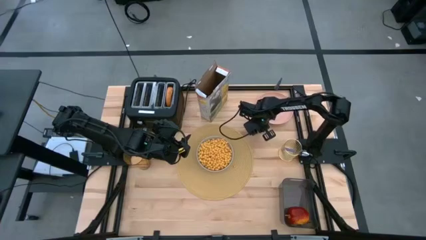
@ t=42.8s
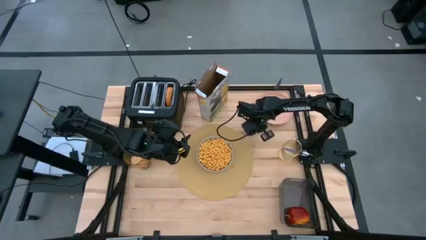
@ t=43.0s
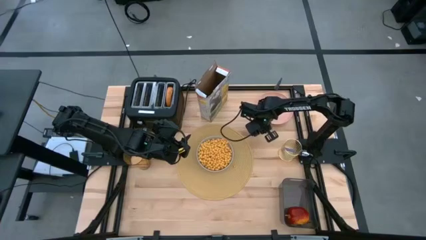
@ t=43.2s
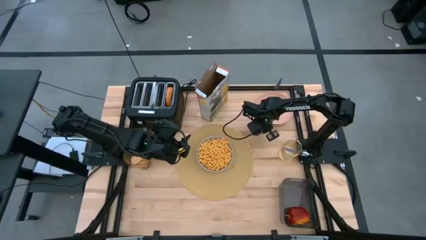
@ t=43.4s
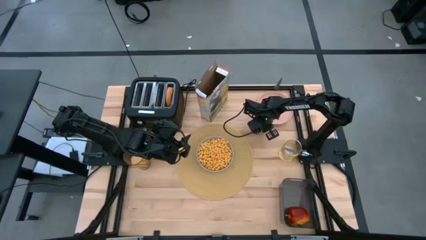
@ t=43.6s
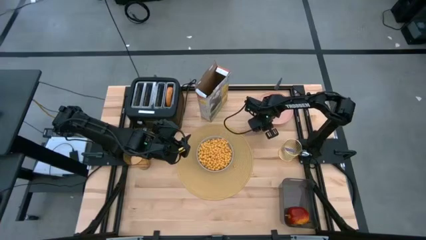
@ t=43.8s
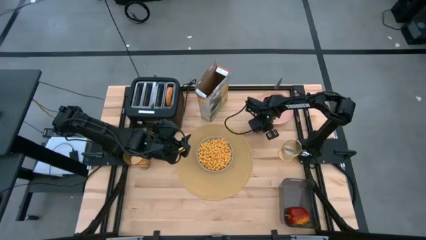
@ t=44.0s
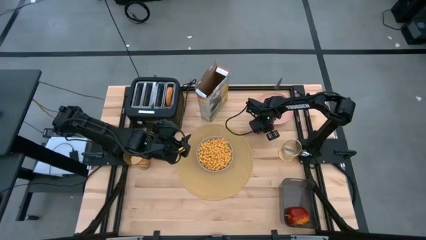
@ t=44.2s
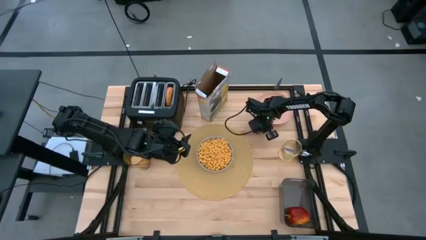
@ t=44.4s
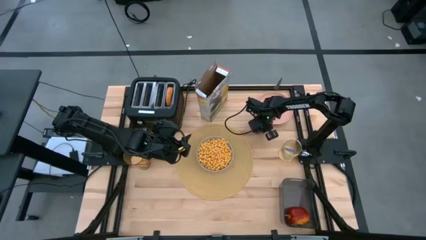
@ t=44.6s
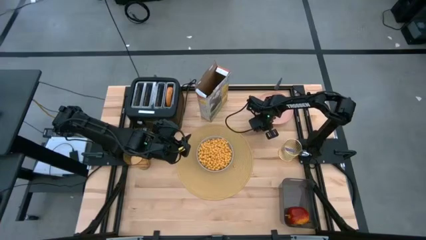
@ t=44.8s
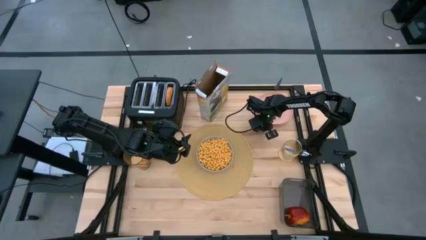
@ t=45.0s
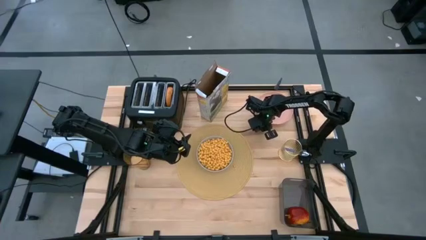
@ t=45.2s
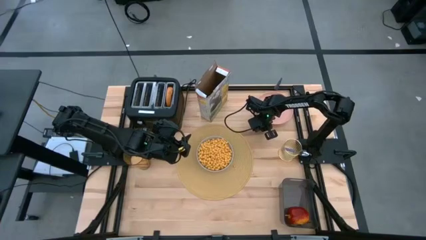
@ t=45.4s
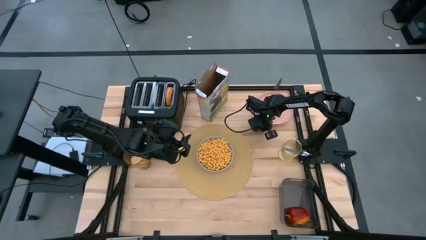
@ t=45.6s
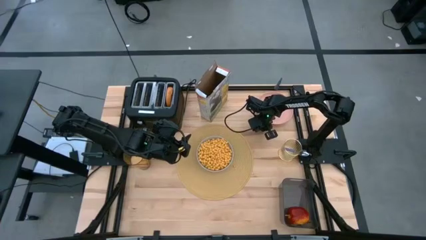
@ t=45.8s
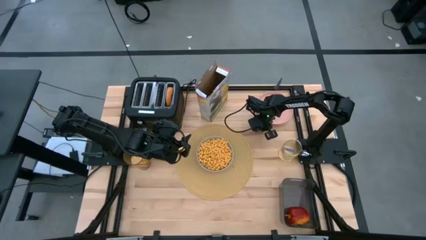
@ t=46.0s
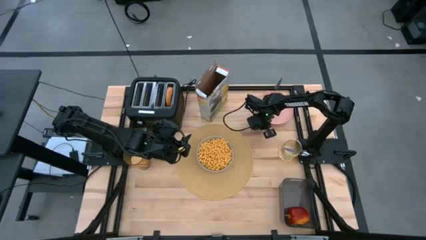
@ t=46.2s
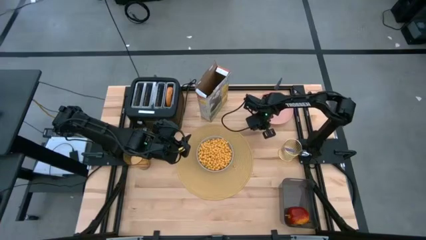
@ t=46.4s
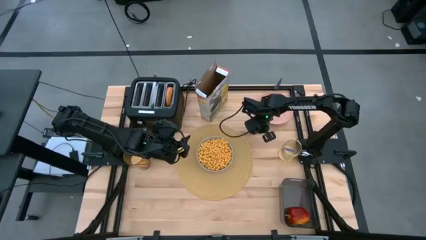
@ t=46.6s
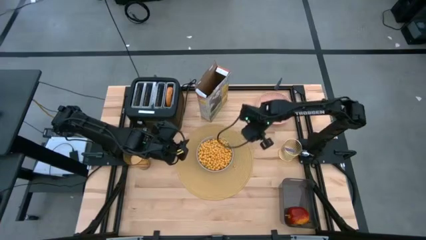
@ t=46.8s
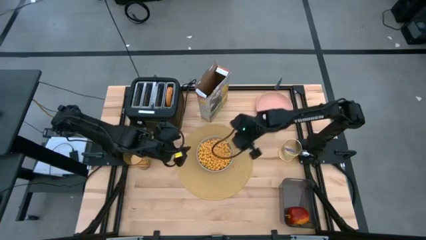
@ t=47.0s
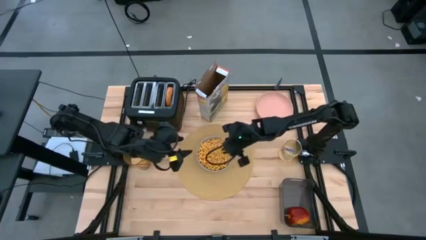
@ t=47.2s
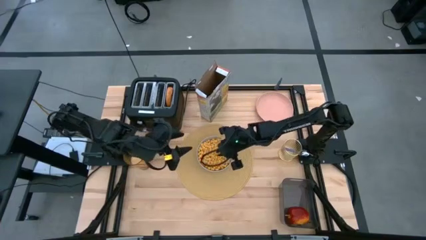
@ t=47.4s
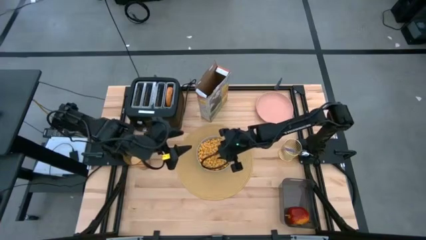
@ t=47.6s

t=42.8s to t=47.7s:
Task: Arrange a breakfast setting
Put the yellow cereal into the gray bowl

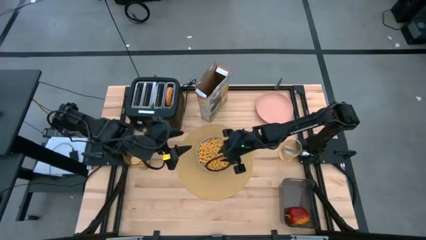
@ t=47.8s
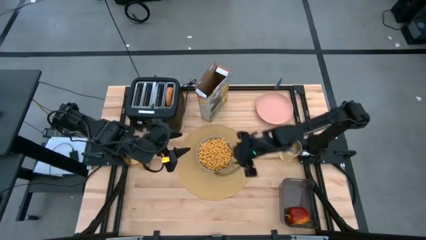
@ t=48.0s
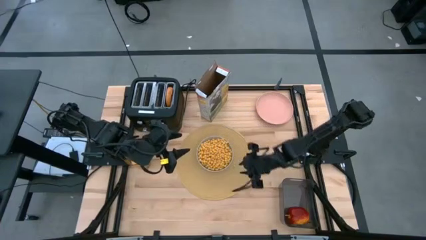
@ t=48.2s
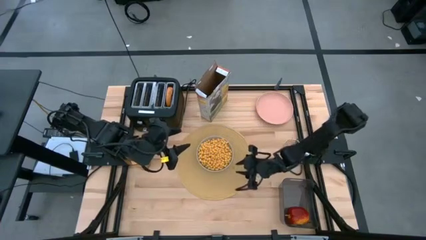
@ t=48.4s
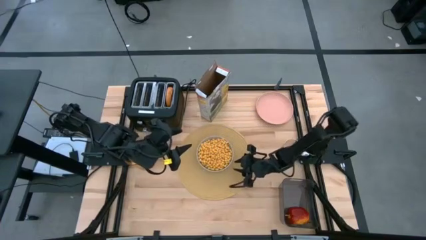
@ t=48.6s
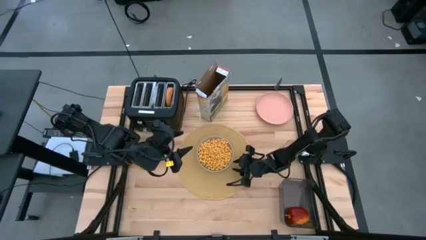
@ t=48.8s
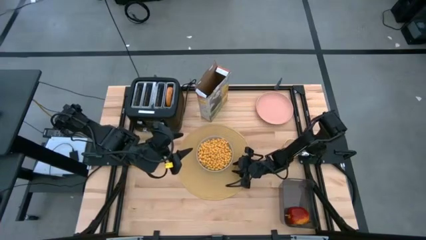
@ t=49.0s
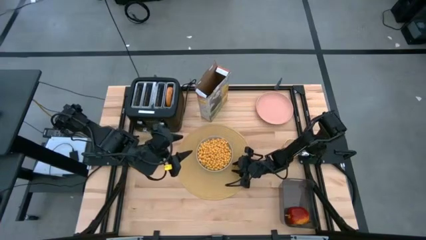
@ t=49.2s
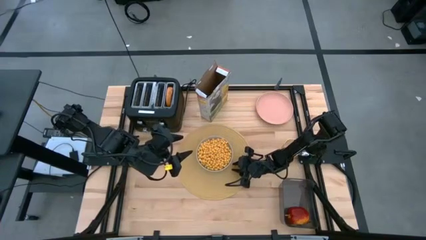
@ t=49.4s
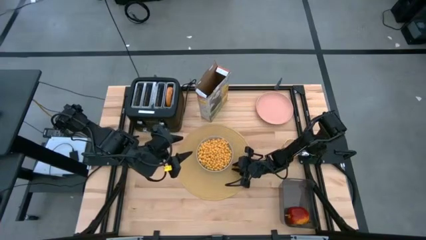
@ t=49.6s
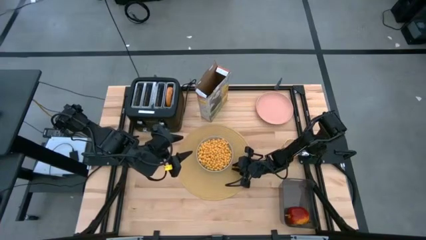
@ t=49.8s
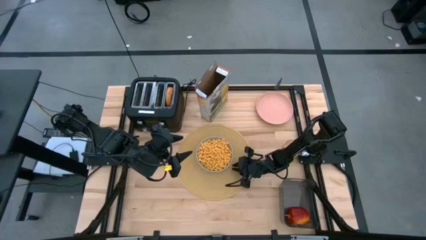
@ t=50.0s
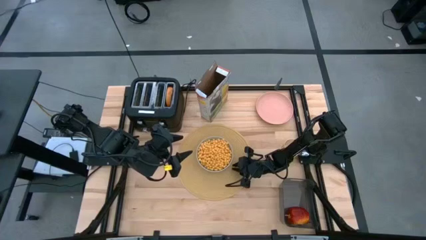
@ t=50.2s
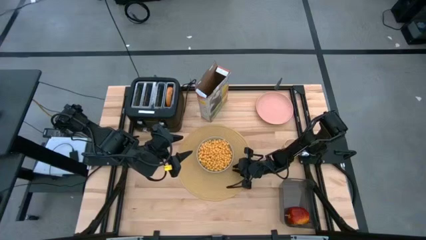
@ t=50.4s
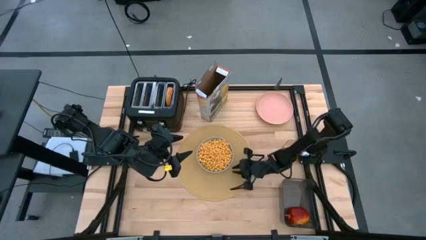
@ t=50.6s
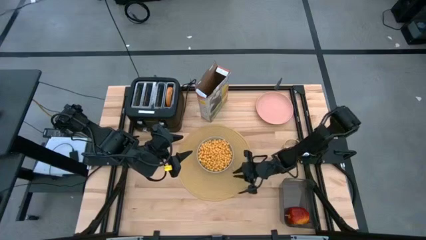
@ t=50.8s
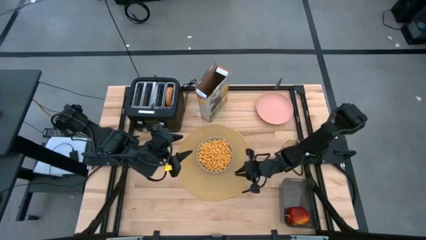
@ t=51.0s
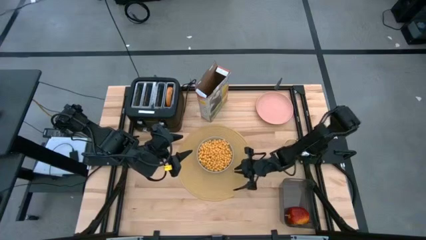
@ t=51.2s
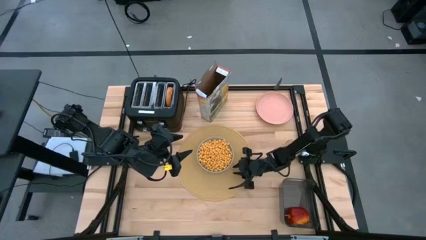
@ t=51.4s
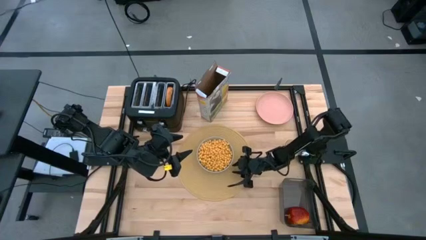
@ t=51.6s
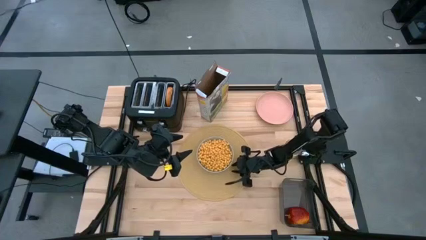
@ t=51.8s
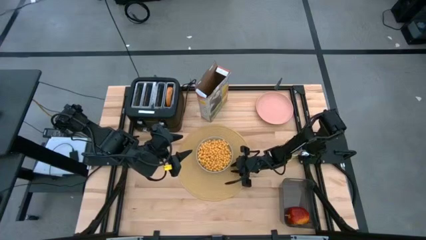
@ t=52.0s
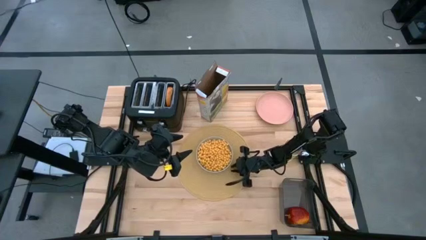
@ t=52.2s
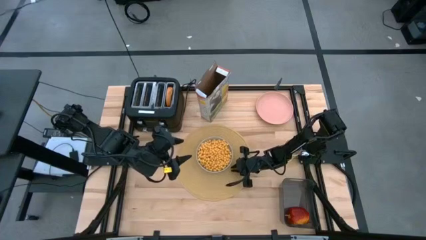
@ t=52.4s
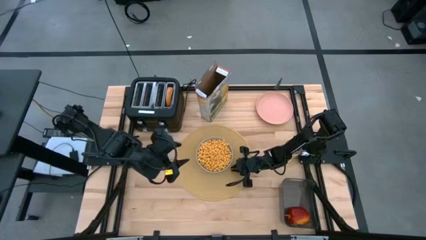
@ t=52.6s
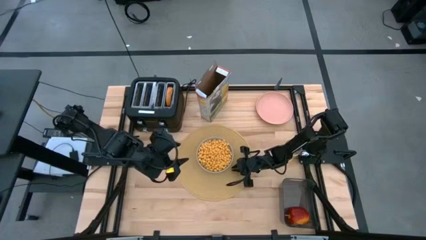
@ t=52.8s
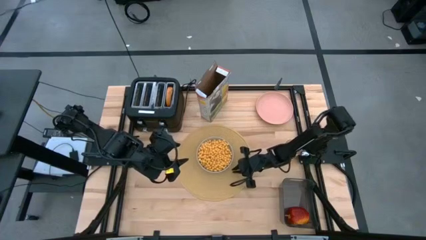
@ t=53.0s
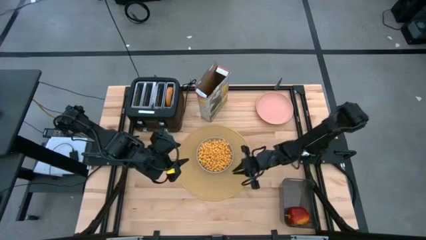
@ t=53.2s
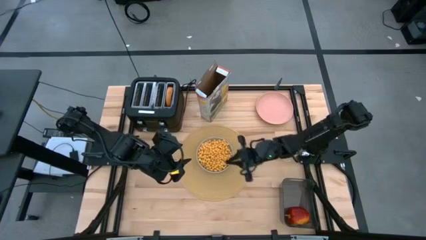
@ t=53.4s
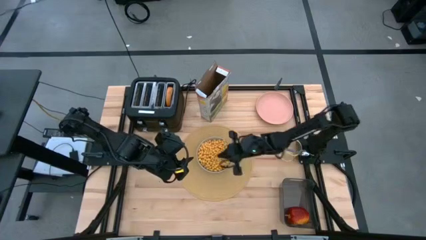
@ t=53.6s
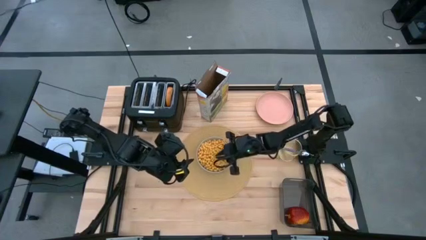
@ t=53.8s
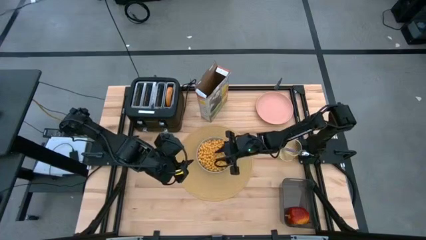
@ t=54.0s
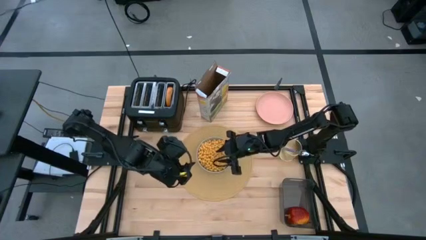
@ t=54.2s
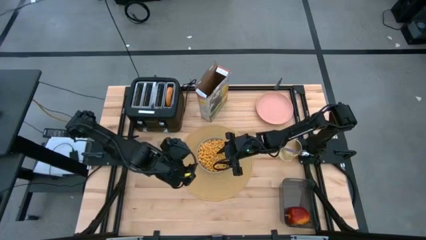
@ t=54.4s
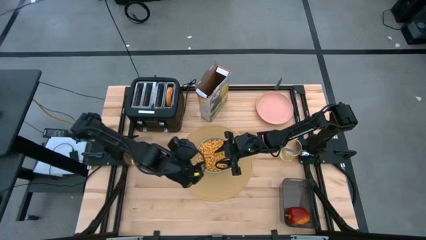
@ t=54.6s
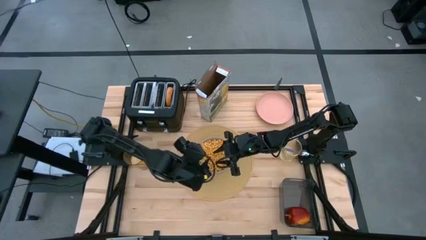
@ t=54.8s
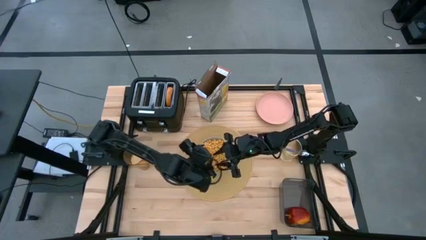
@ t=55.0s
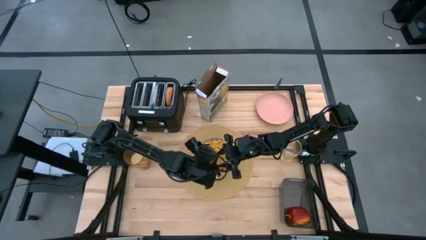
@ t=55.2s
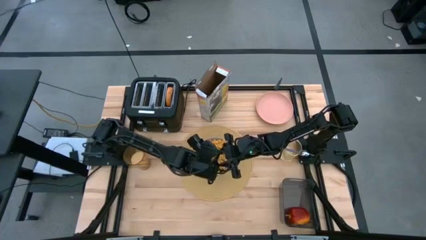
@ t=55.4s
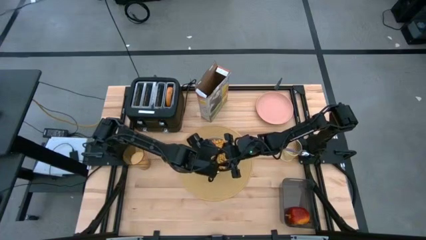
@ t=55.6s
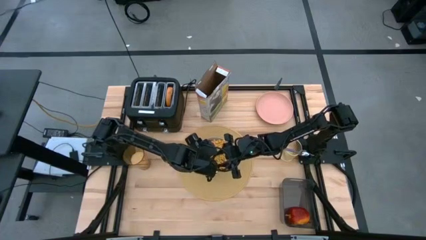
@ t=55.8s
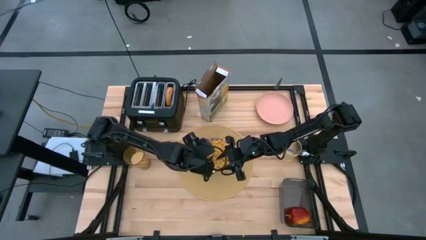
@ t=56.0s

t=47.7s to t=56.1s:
Put the yellow cereal into the gray bowl
